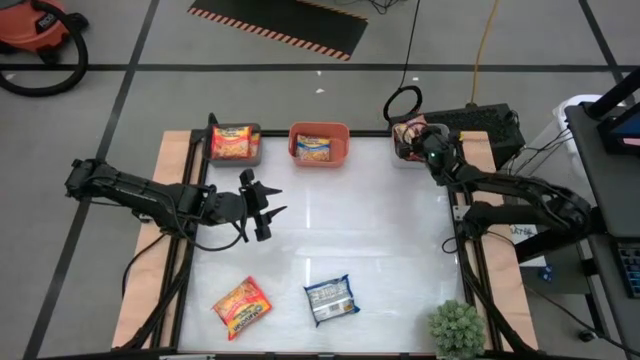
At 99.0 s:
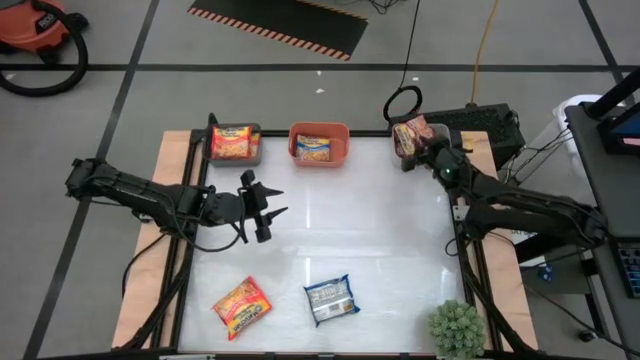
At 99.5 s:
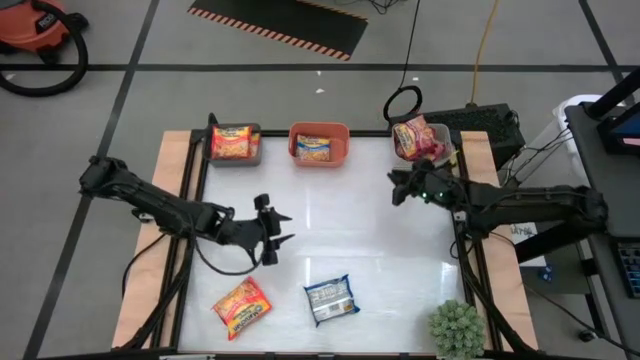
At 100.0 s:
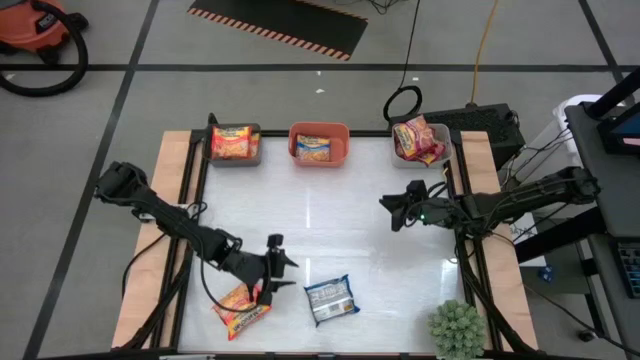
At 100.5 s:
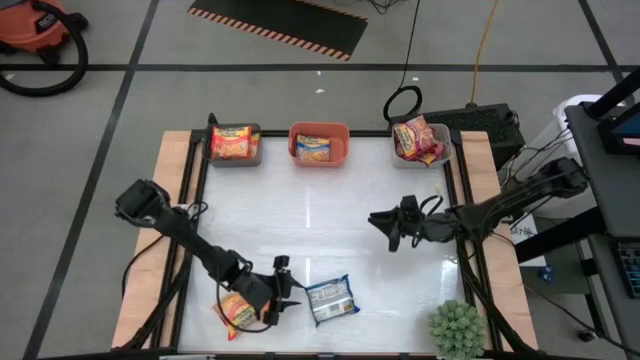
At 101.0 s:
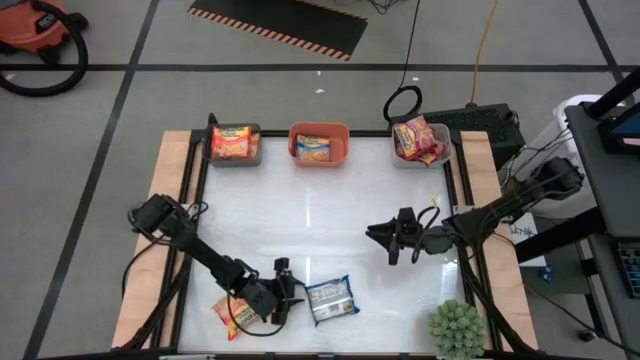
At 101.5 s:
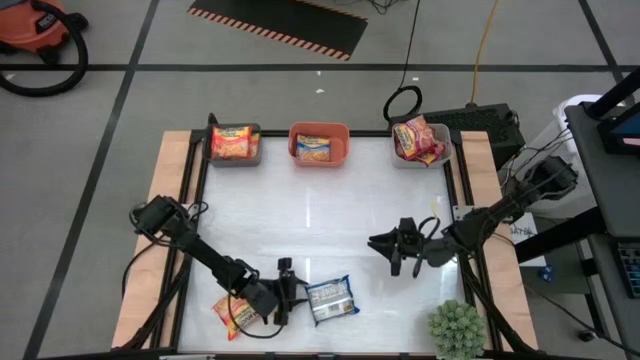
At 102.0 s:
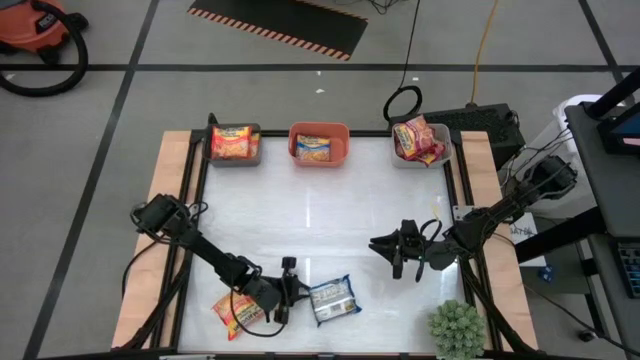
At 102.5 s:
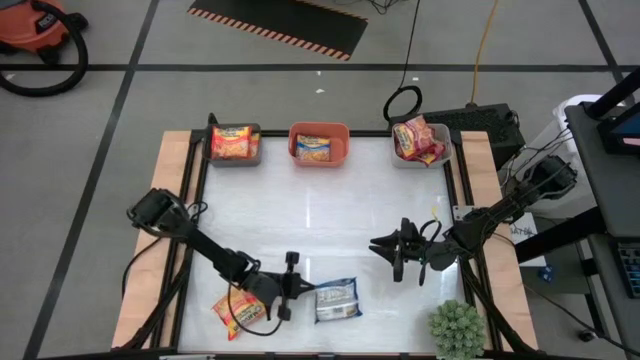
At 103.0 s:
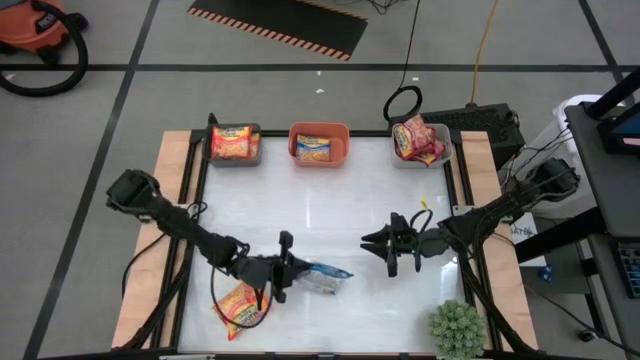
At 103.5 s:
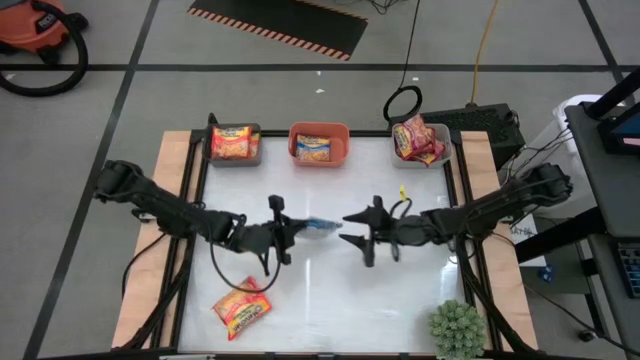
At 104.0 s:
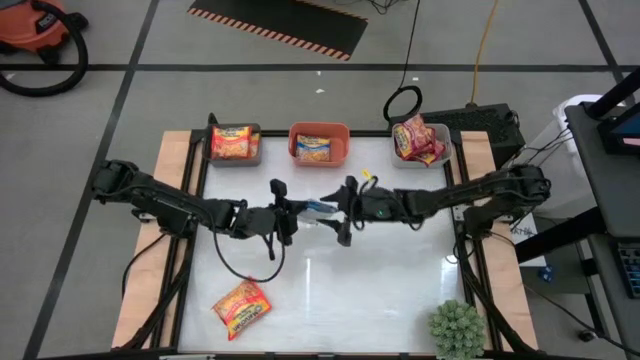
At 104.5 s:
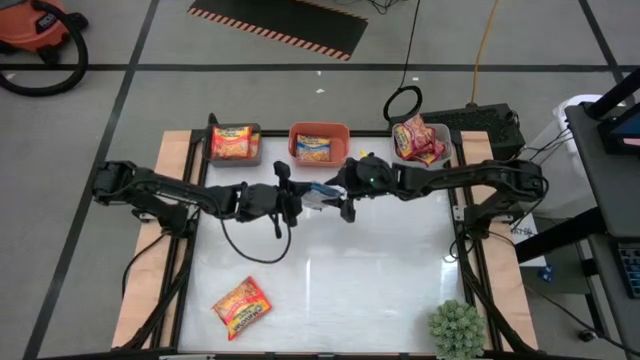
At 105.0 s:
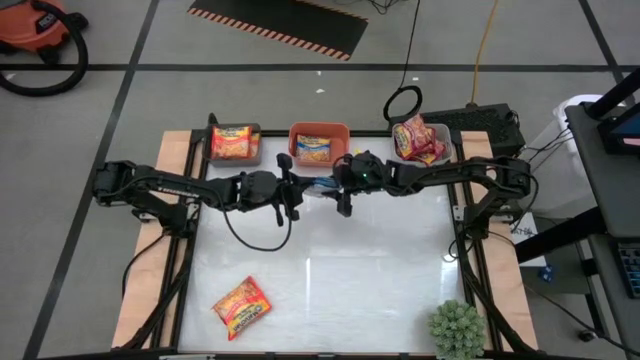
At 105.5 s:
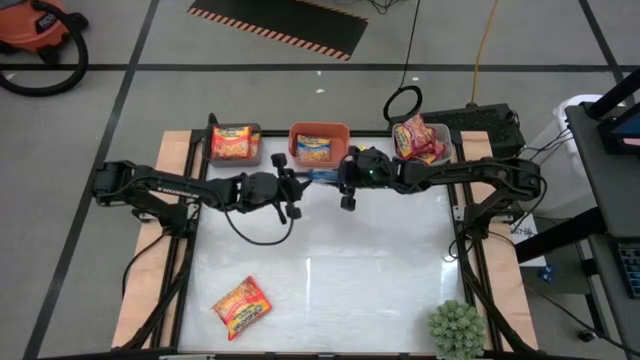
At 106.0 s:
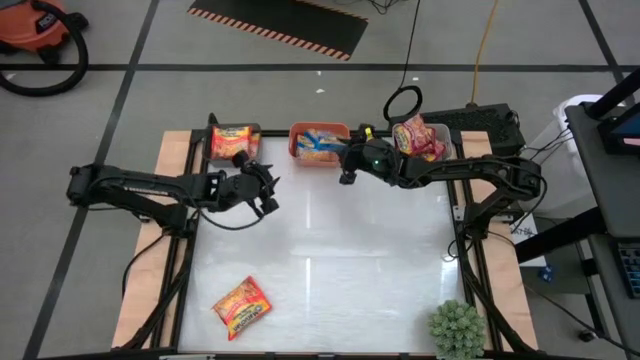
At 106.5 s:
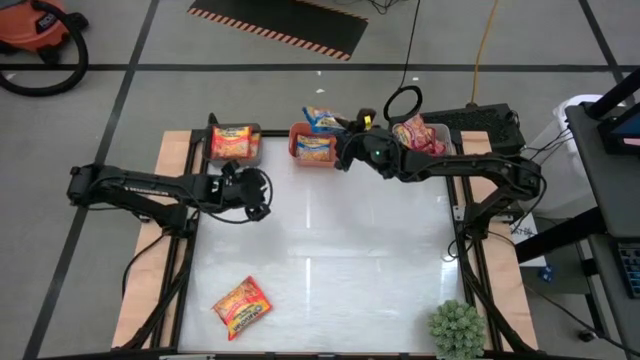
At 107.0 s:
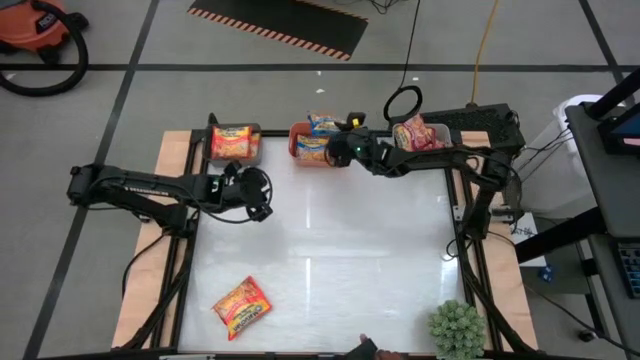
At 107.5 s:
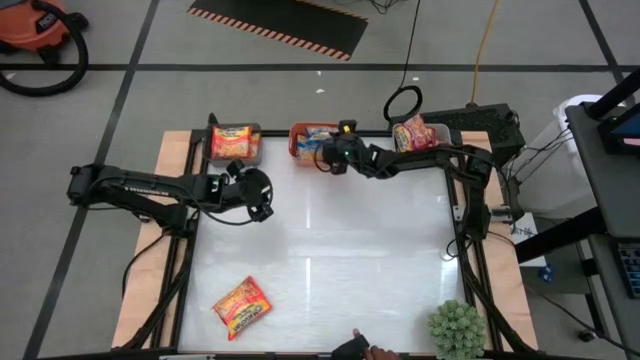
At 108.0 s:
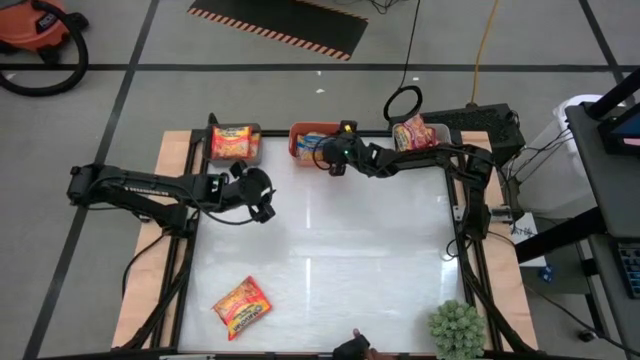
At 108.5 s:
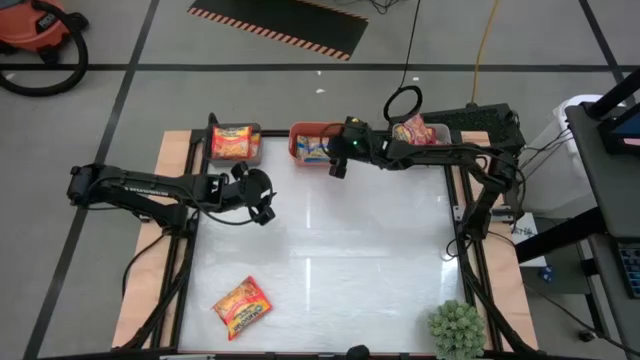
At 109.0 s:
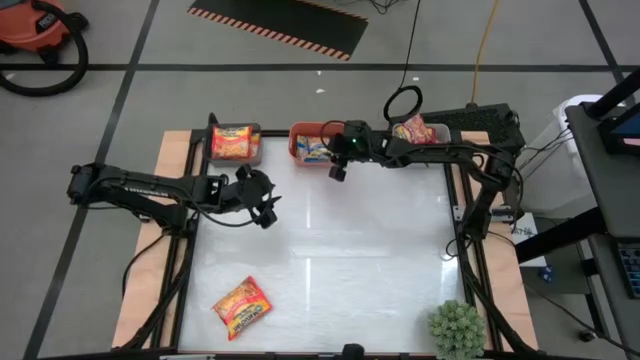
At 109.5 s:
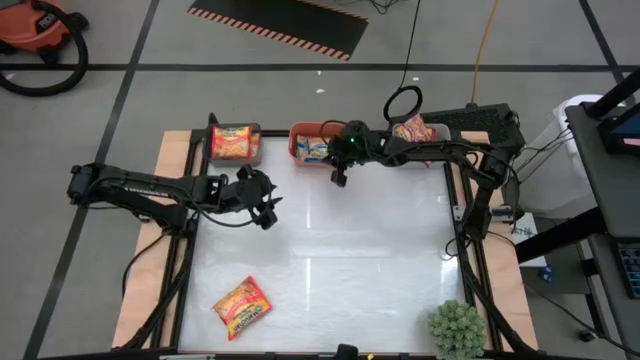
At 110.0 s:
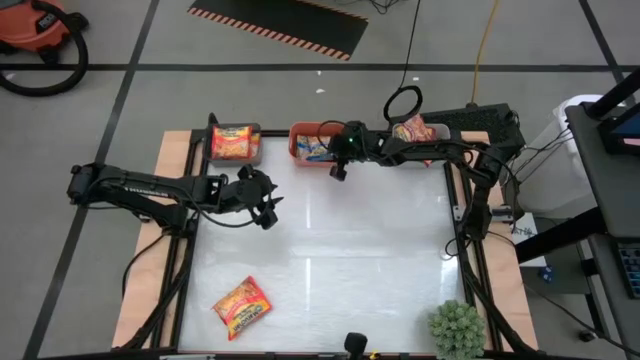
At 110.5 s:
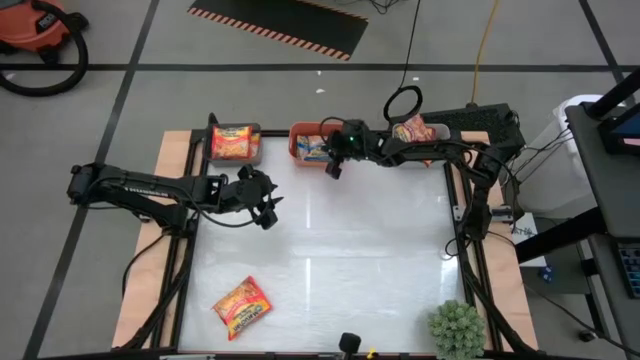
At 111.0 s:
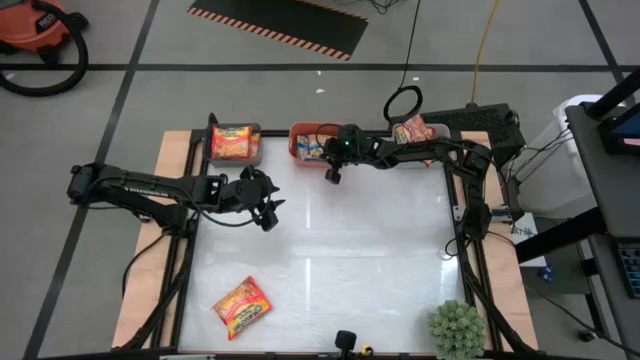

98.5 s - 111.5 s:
Task: Sort Maruchan noodles
Put the blue noodle pack into the orange bin

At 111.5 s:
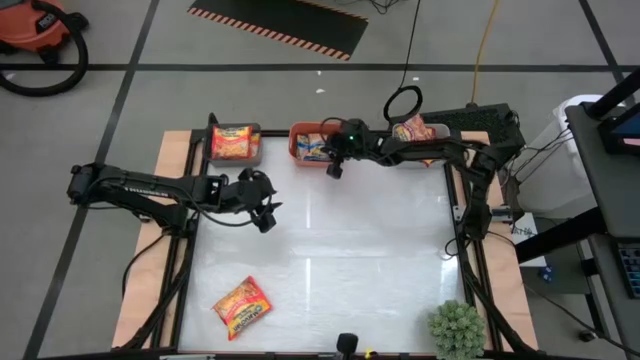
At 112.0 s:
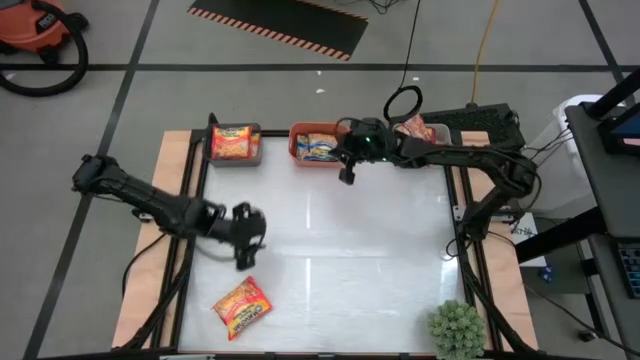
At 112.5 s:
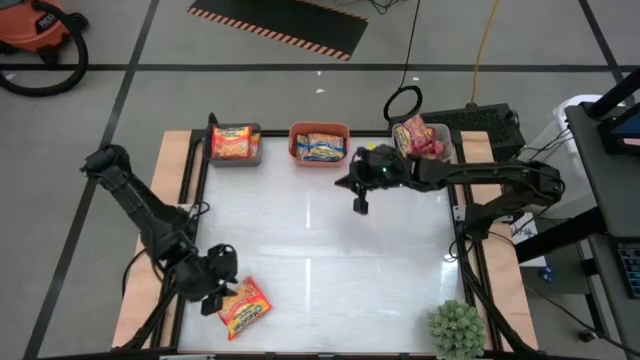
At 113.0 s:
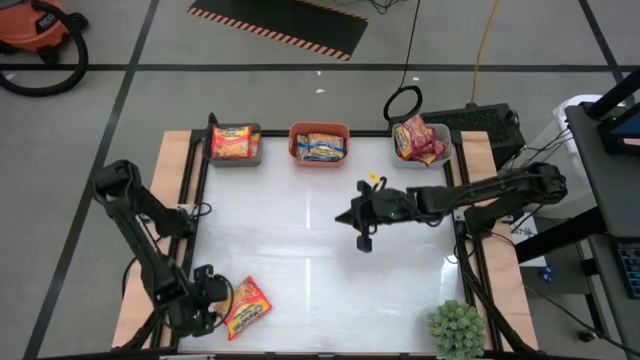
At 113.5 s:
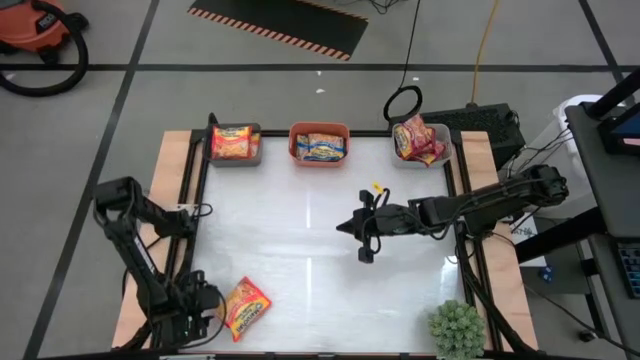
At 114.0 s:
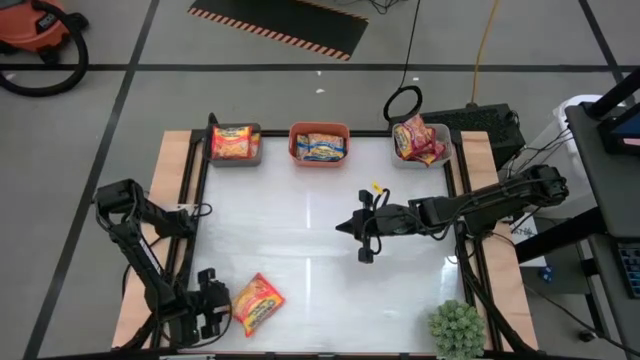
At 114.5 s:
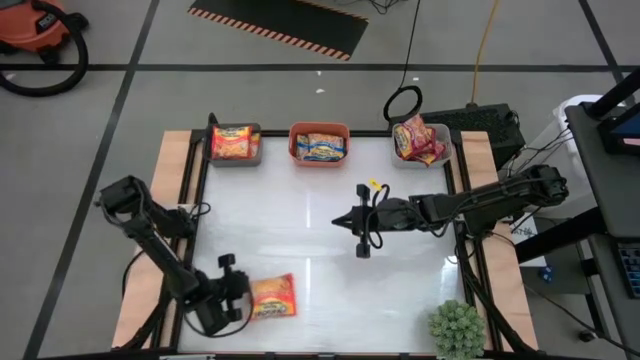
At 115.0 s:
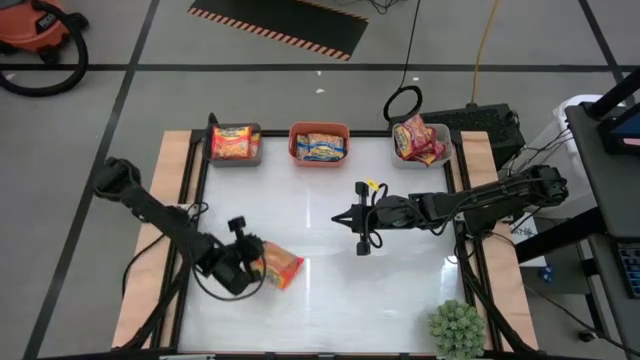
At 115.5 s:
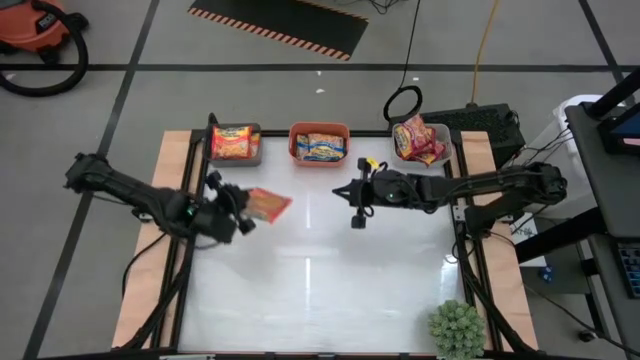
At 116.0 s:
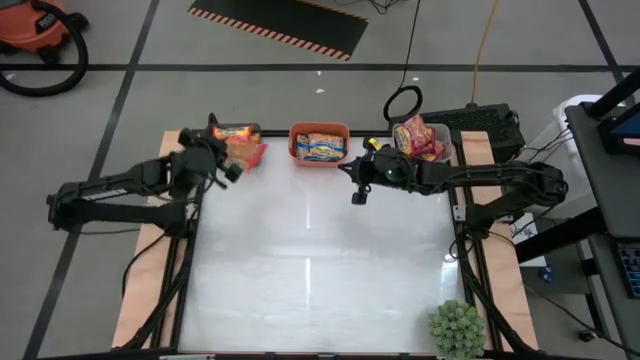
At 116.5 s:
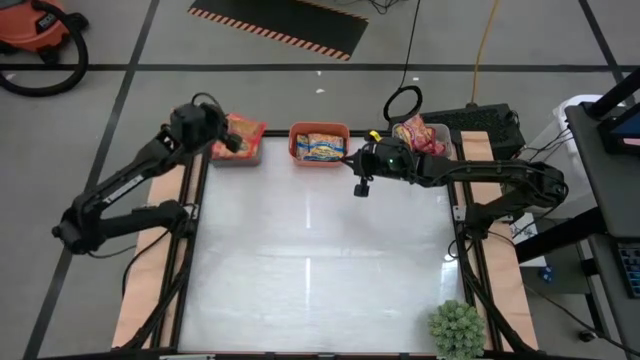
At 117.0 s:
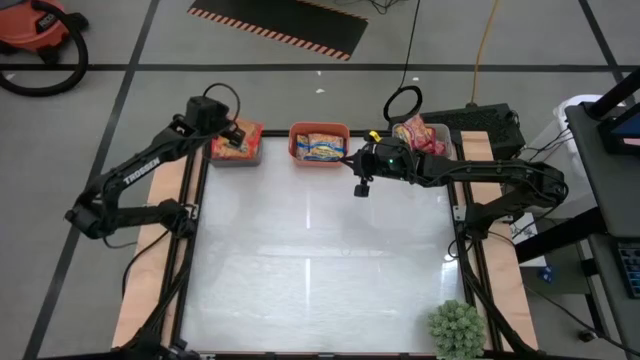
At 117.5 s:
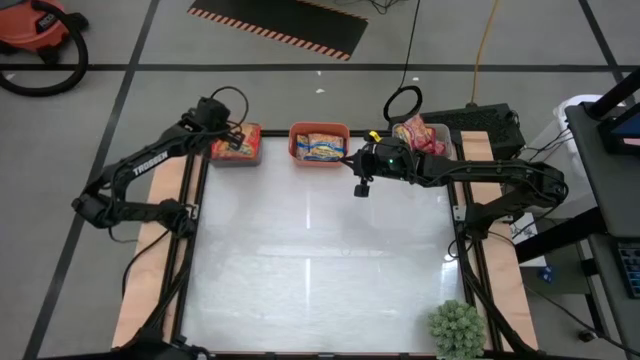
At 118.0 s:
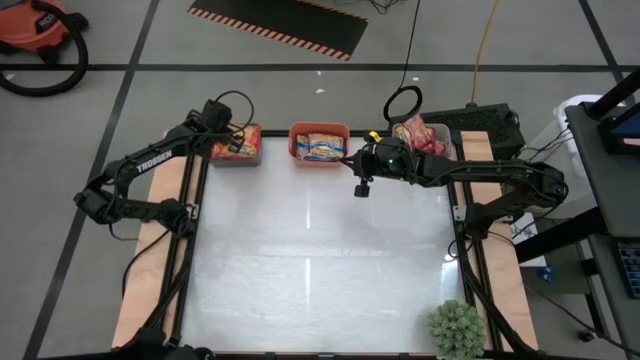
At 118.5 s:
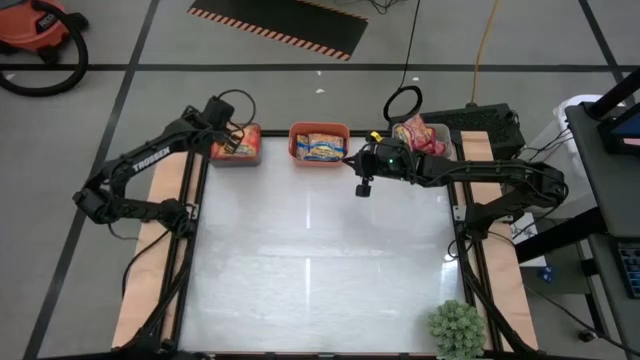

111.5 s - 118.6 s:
Put the orange noodle pack into the black bin
